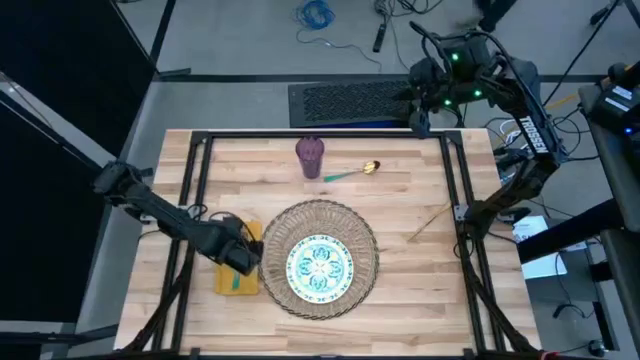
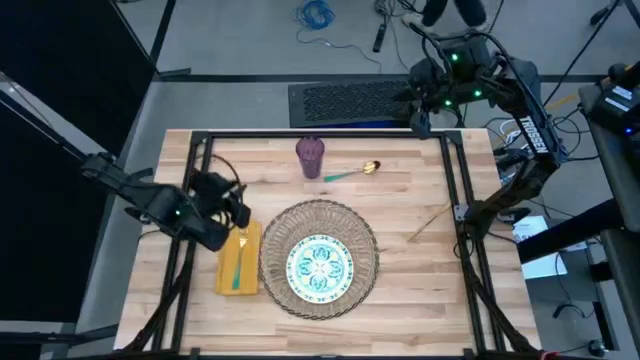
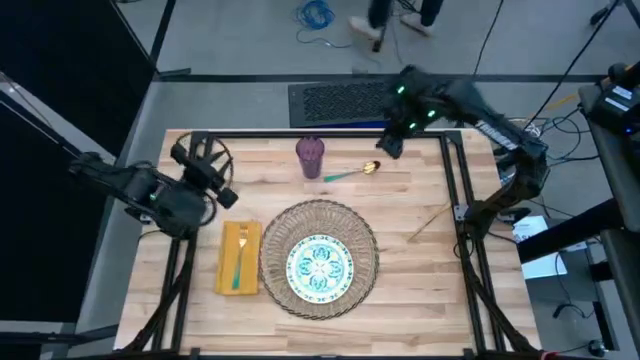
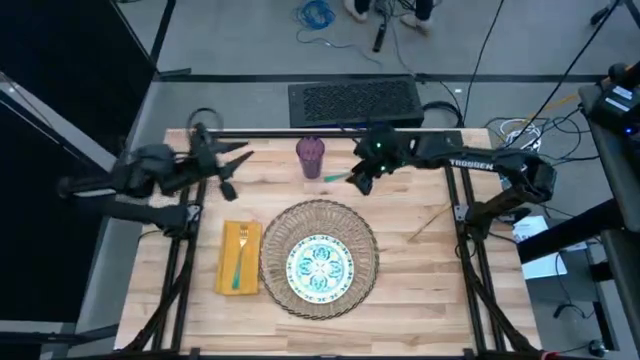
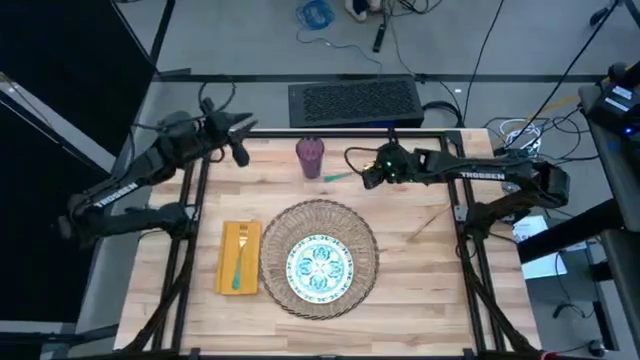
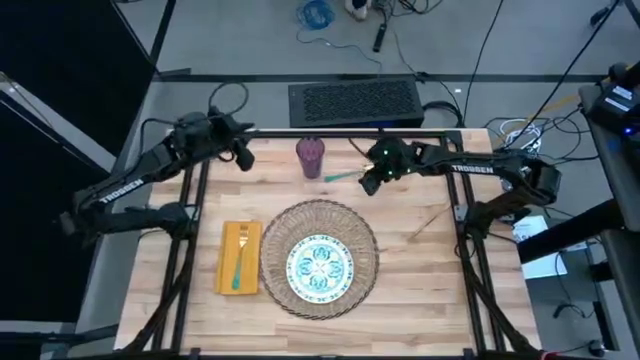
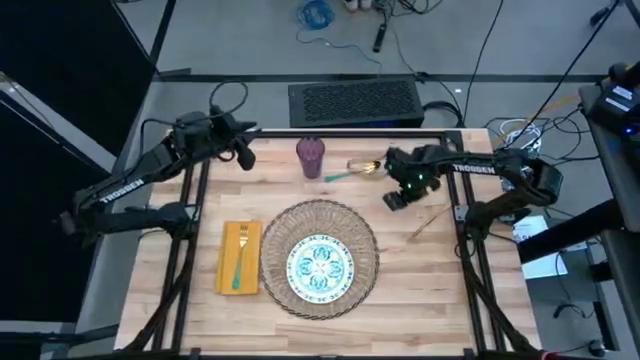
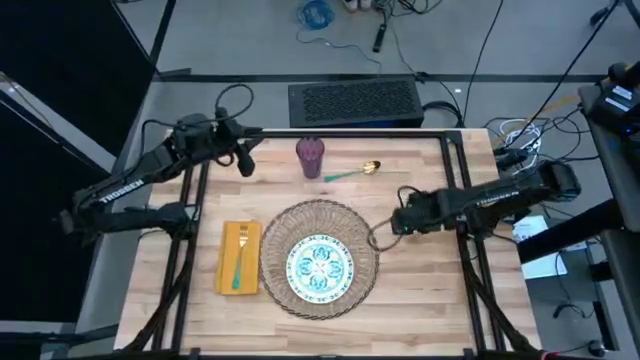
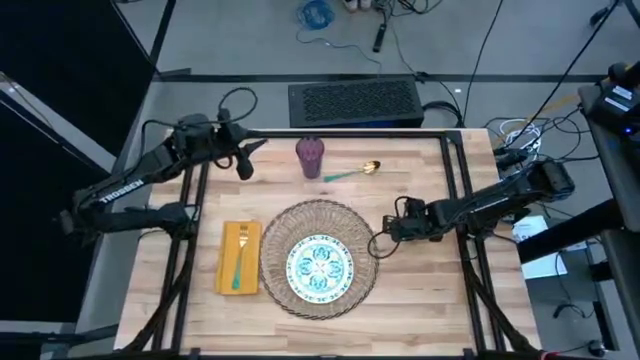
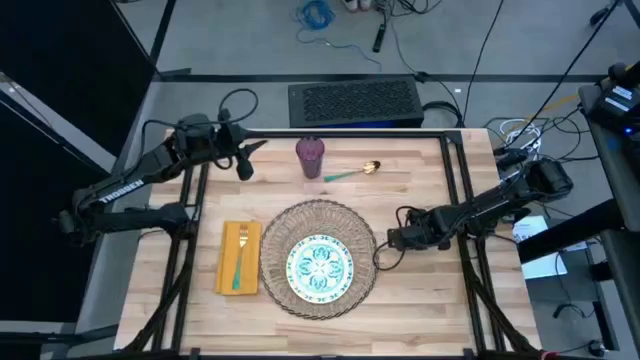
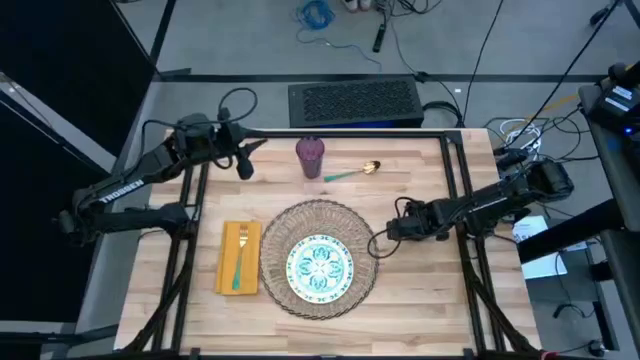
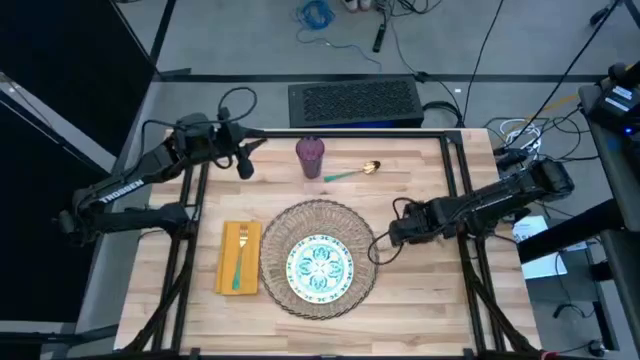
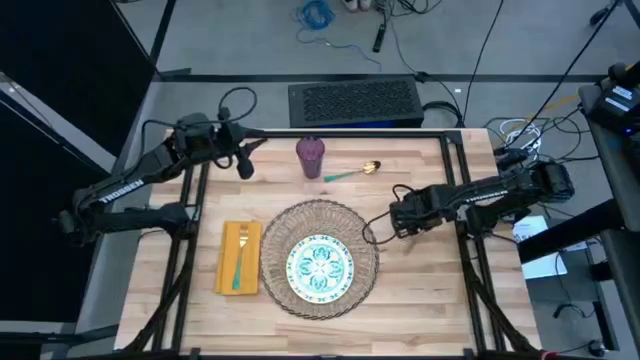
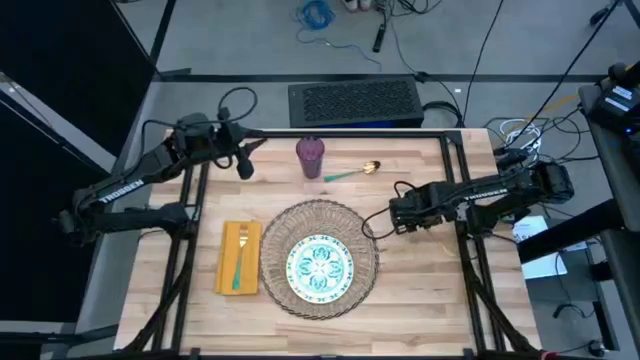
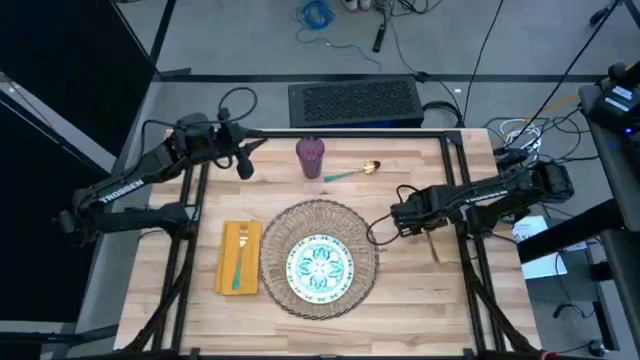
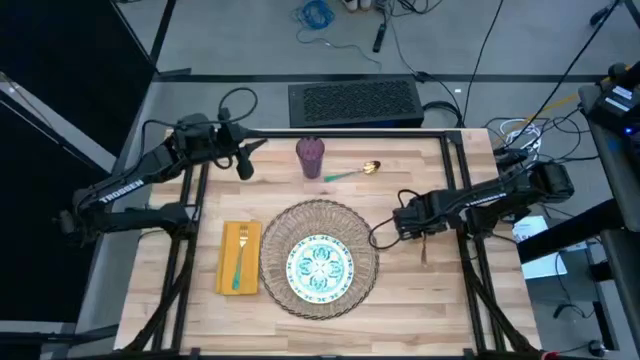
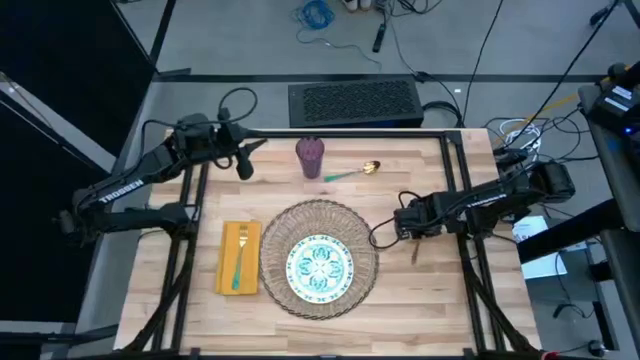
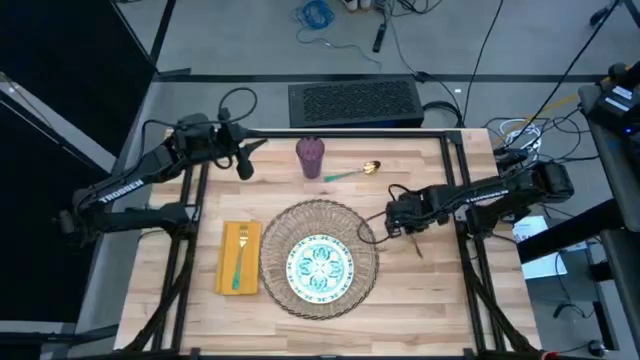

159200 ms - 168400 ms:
Task: Set table place
Move the gold table knife to the right of the brown tablemat

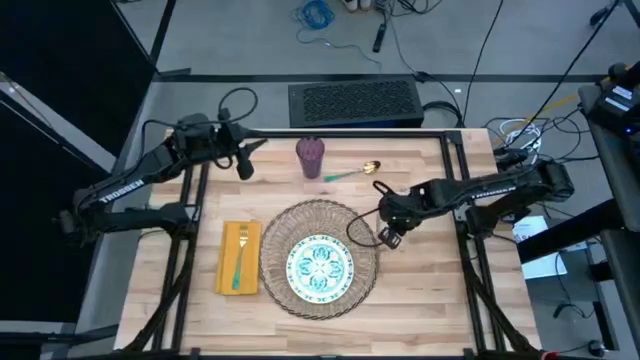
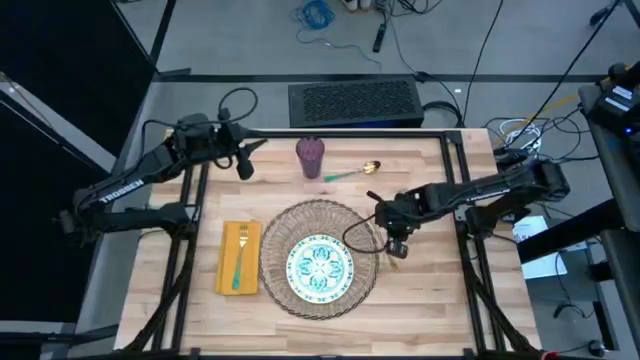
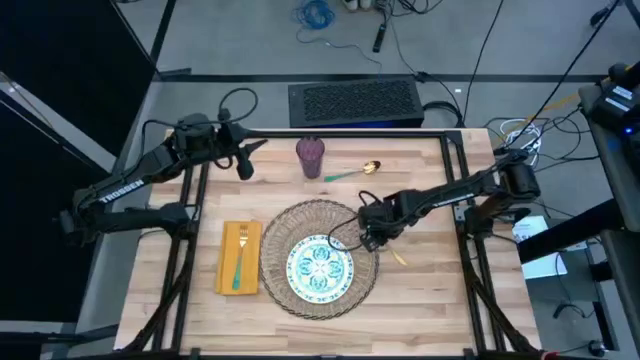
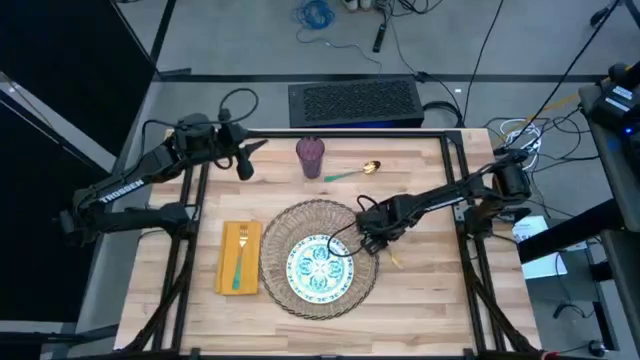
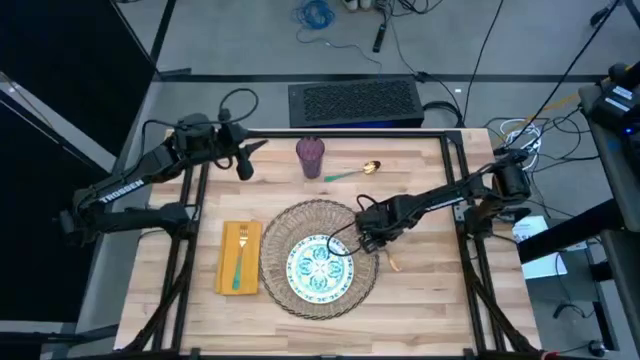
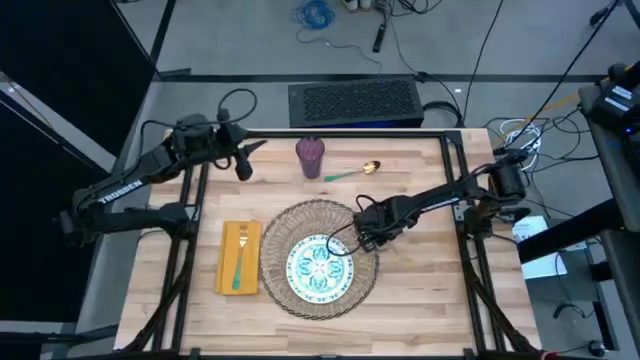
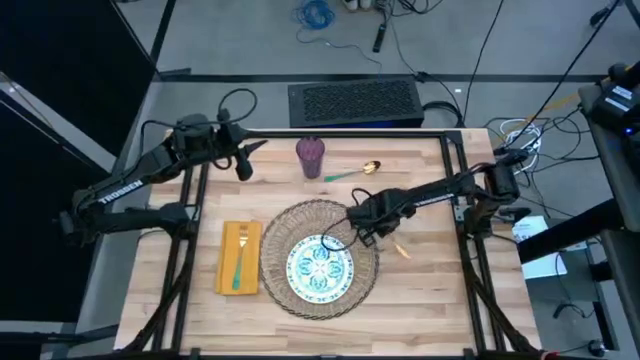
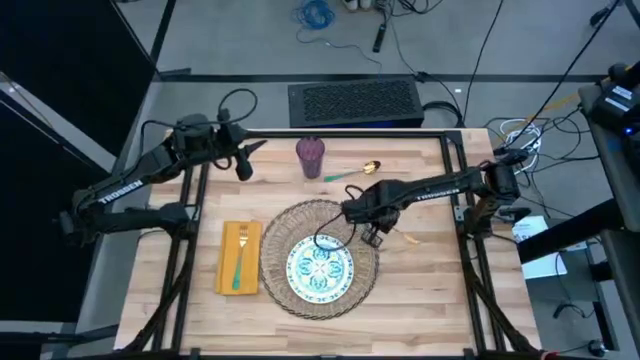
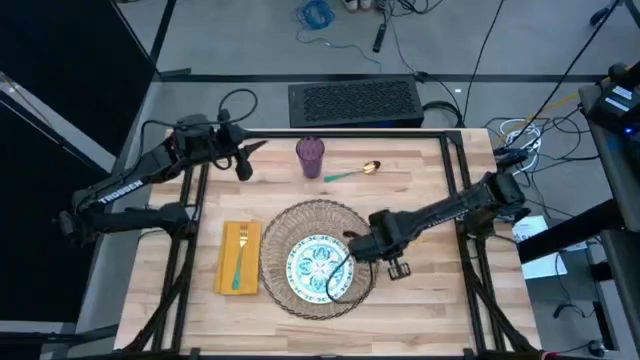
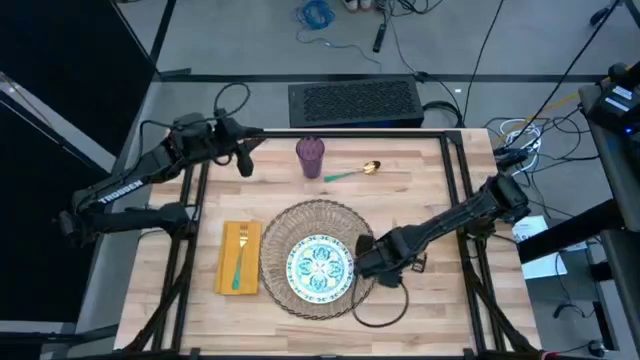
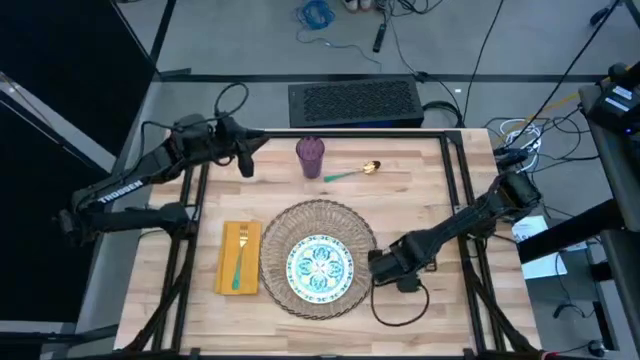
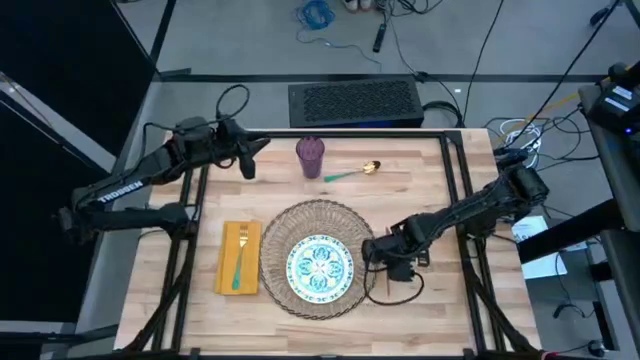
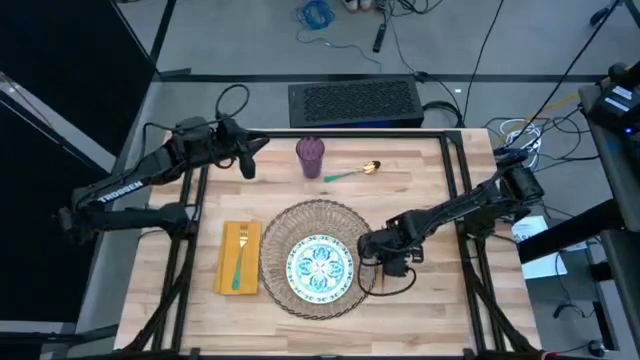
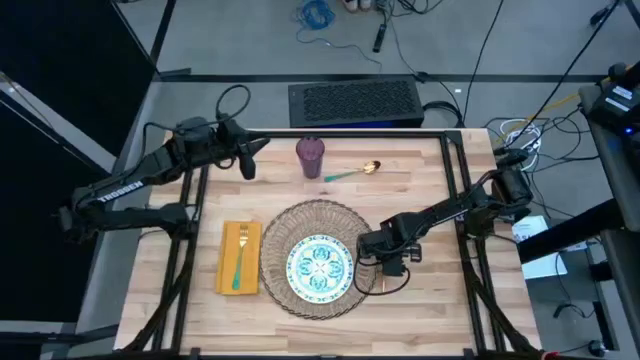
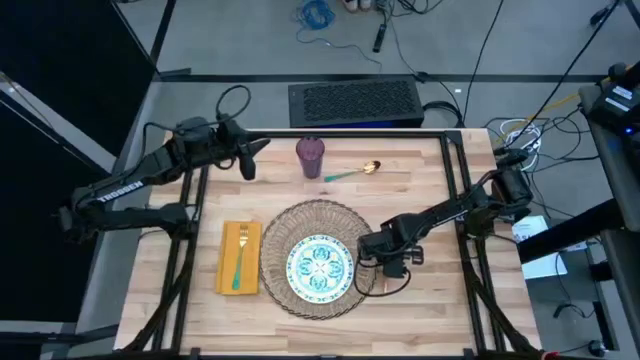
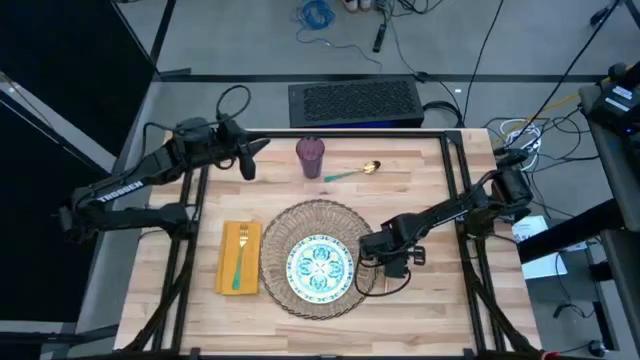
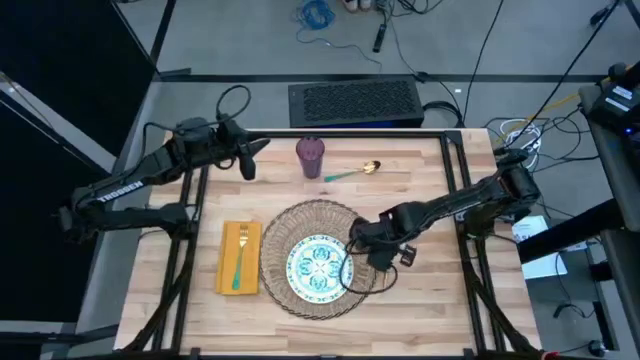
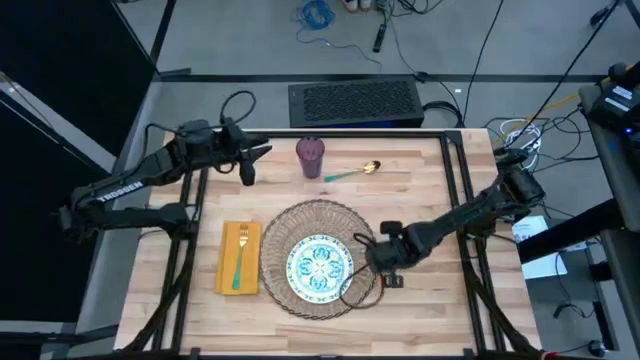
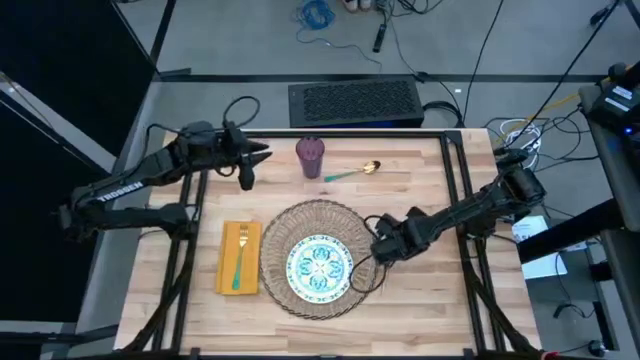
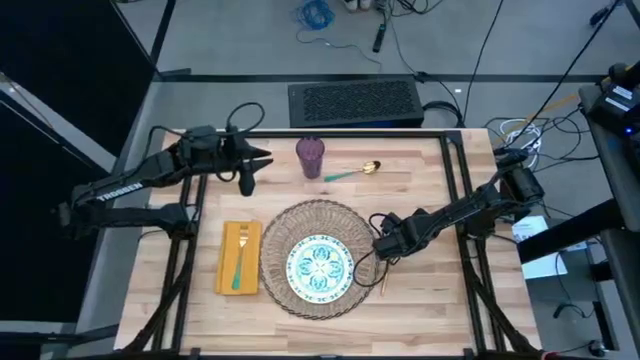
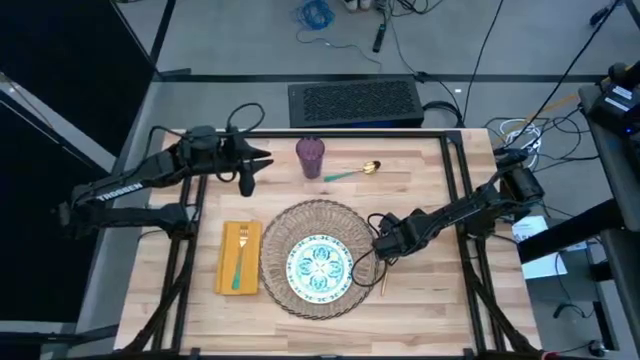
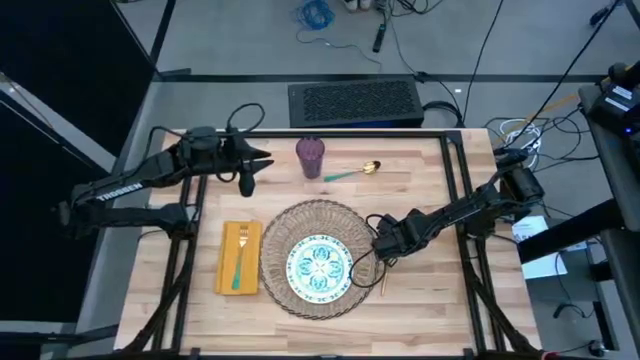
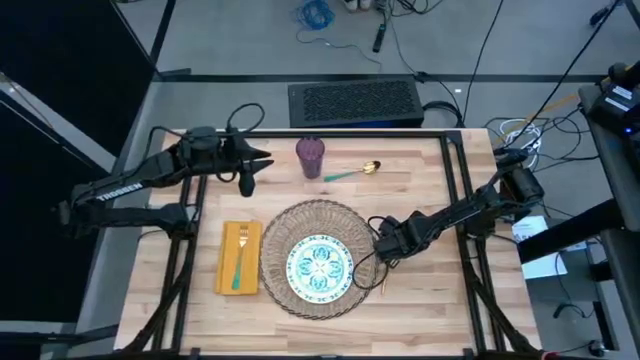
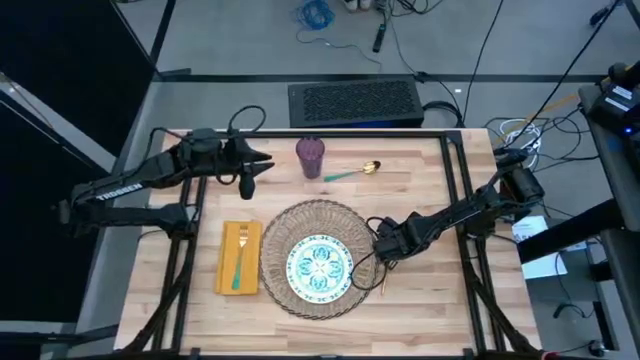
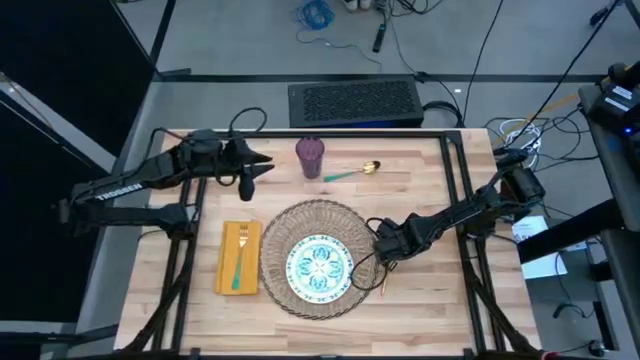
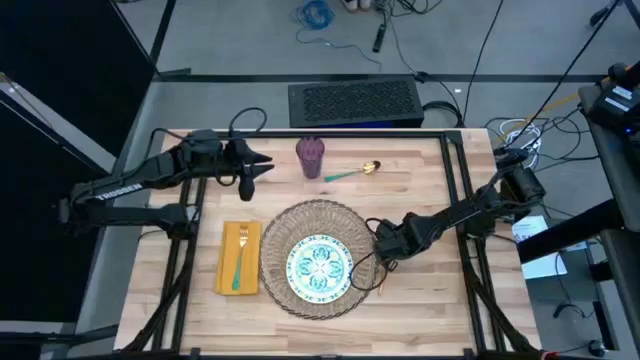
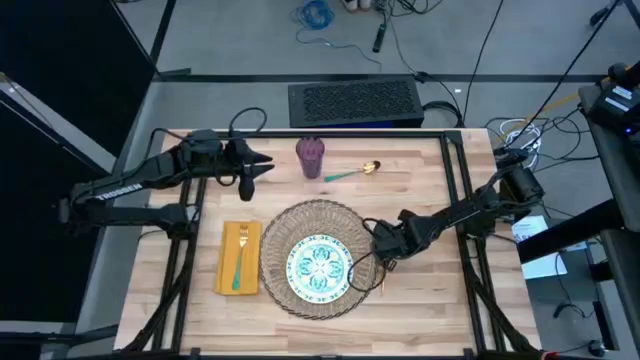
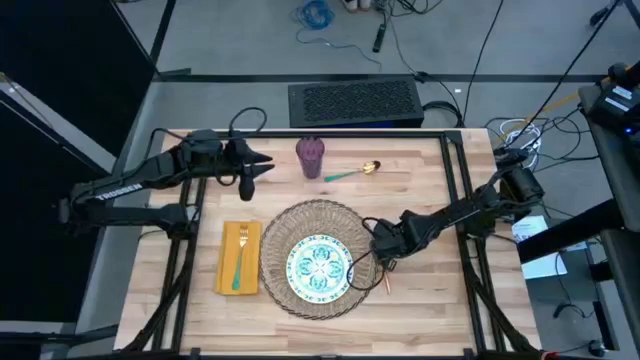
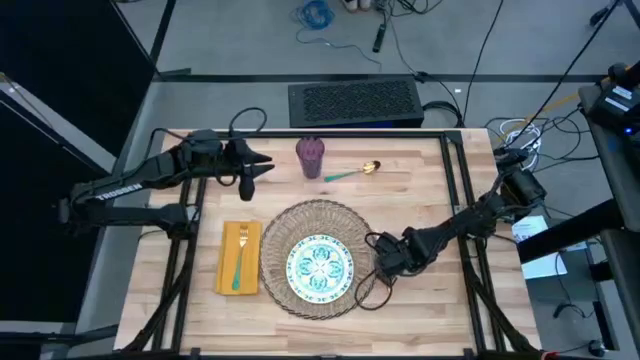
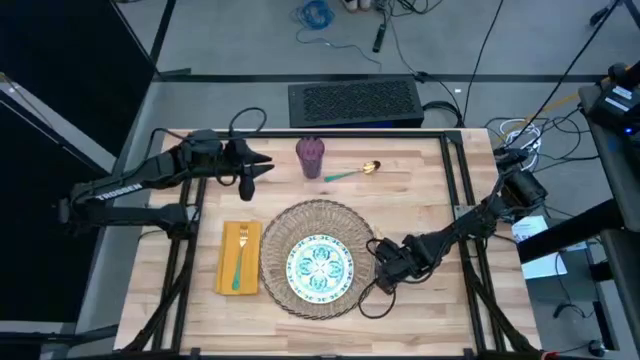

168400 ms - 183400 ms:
Move the gold table knife to the right of the brown tablemat
